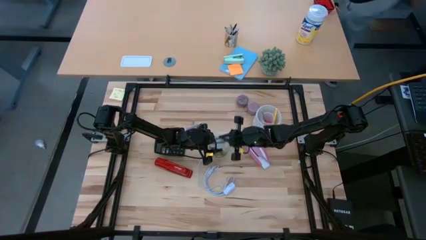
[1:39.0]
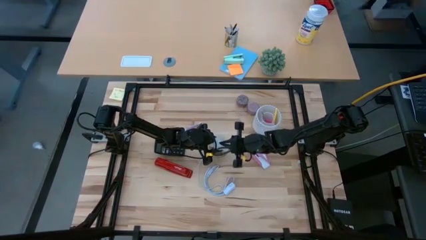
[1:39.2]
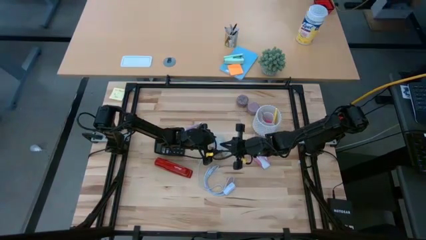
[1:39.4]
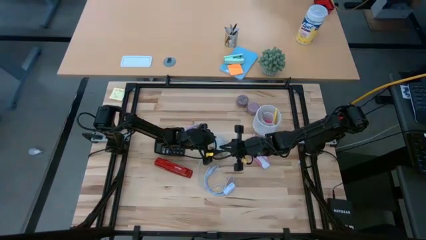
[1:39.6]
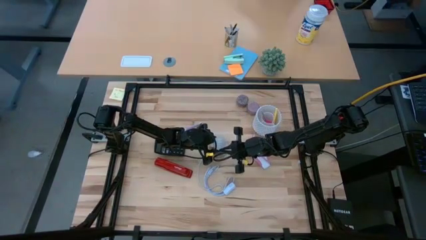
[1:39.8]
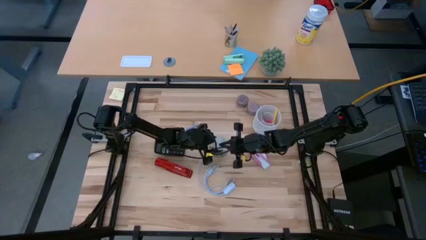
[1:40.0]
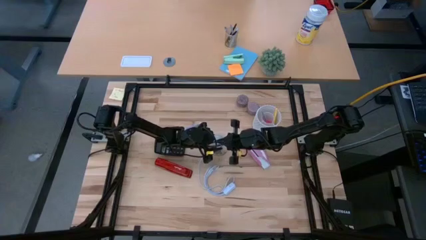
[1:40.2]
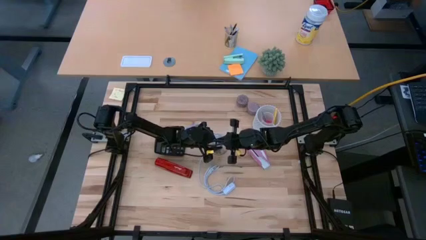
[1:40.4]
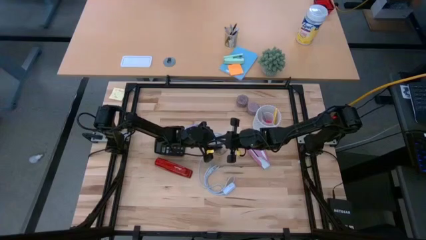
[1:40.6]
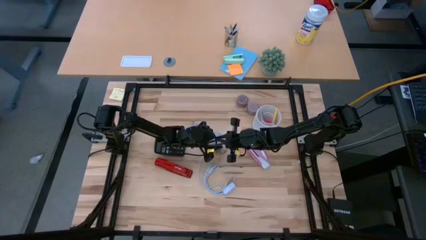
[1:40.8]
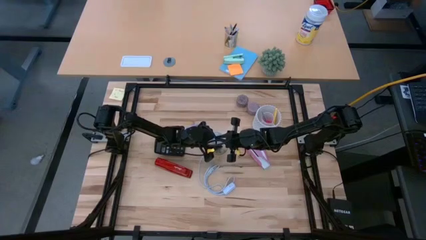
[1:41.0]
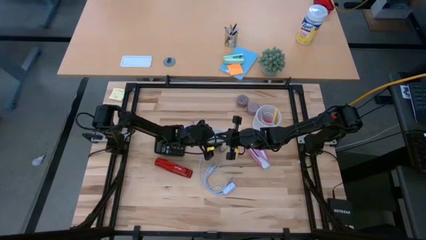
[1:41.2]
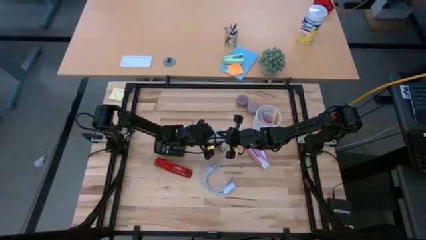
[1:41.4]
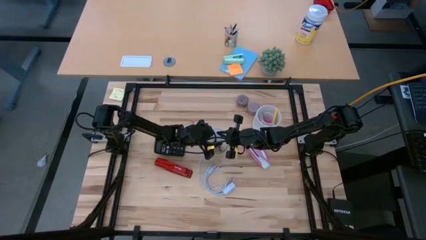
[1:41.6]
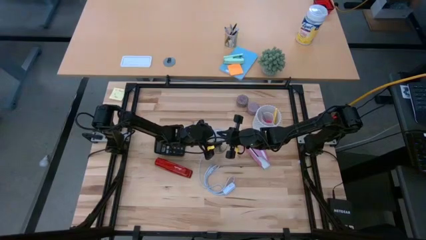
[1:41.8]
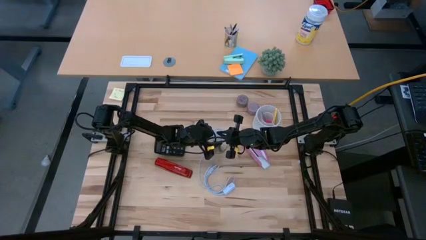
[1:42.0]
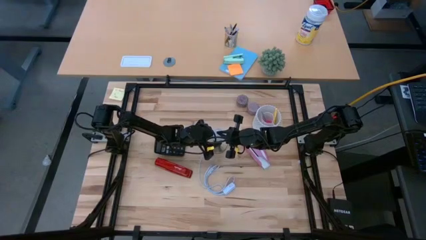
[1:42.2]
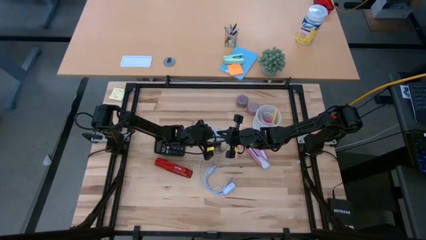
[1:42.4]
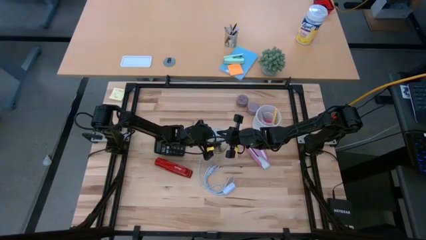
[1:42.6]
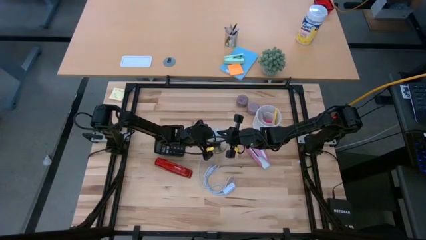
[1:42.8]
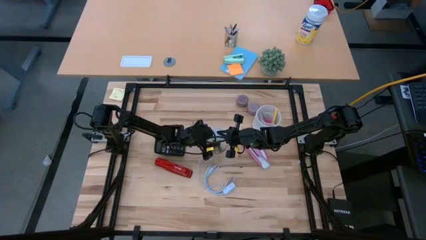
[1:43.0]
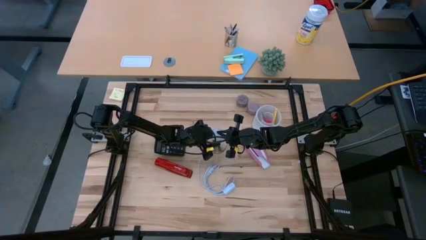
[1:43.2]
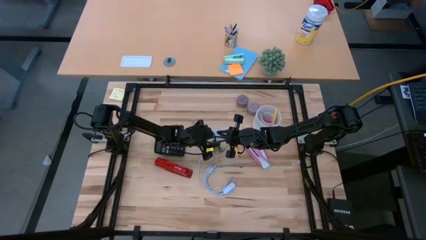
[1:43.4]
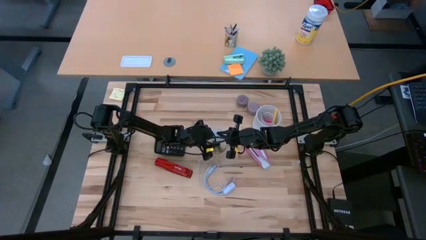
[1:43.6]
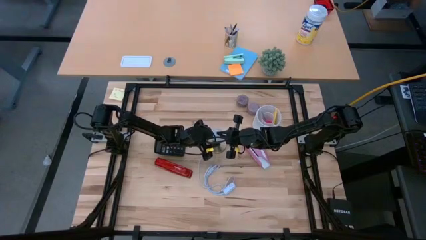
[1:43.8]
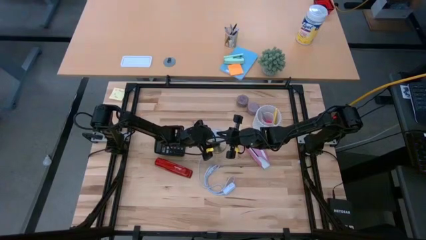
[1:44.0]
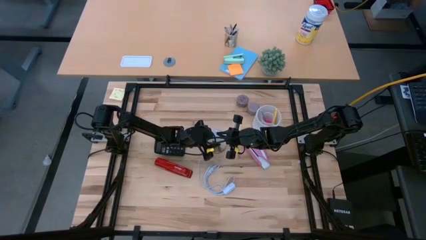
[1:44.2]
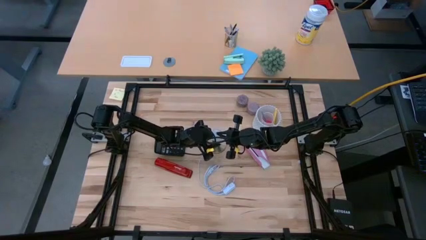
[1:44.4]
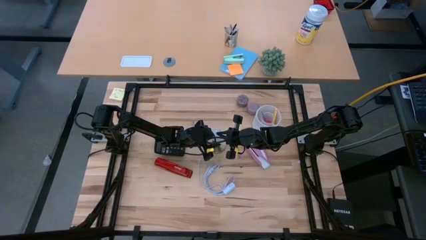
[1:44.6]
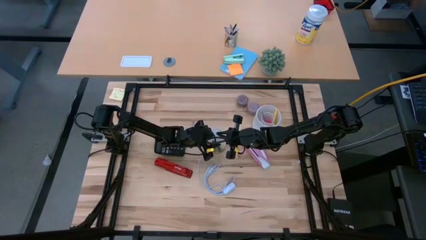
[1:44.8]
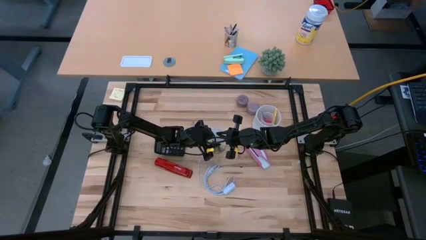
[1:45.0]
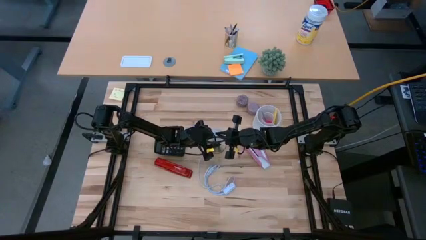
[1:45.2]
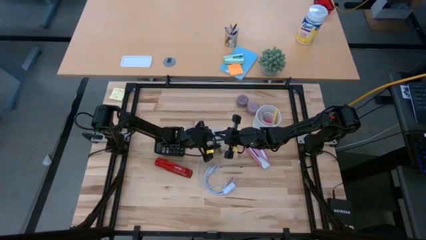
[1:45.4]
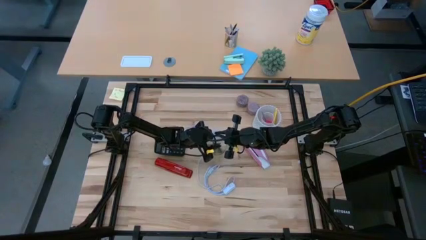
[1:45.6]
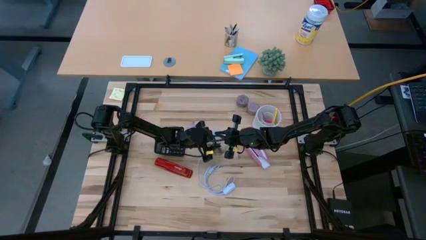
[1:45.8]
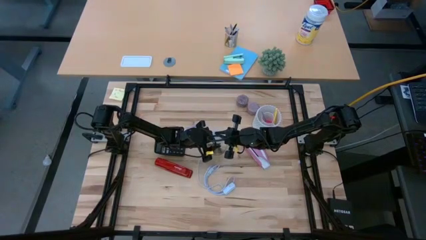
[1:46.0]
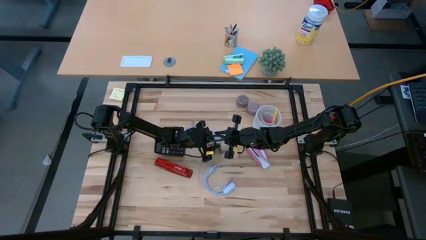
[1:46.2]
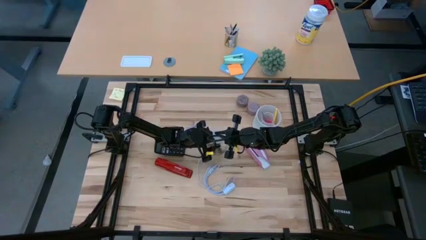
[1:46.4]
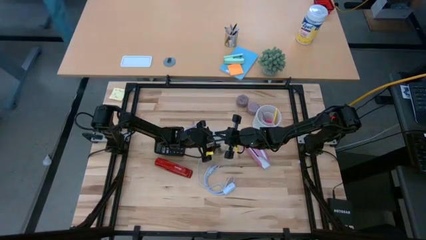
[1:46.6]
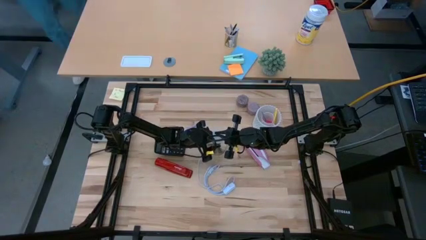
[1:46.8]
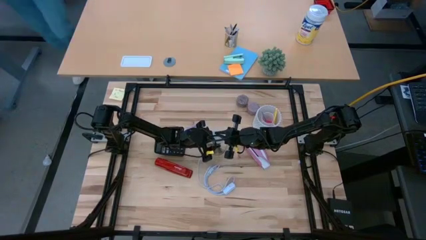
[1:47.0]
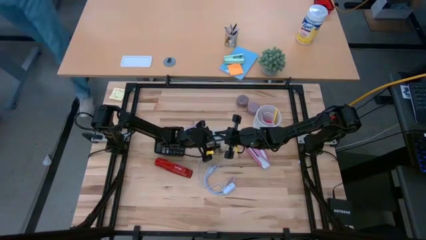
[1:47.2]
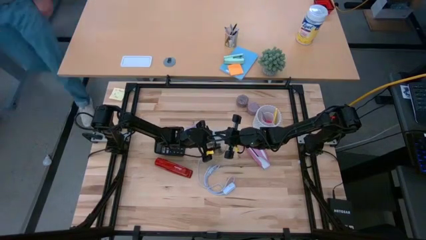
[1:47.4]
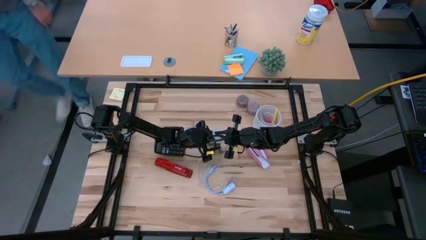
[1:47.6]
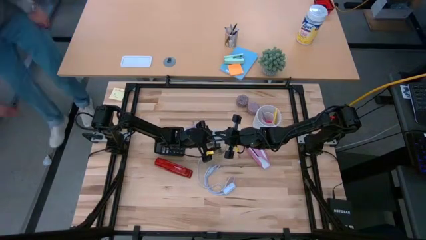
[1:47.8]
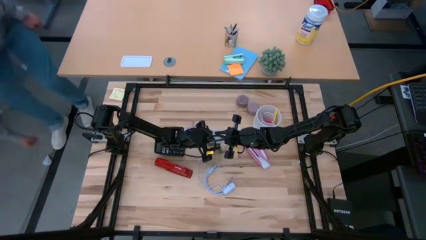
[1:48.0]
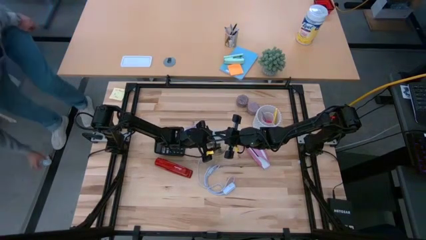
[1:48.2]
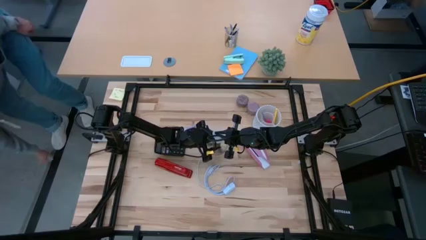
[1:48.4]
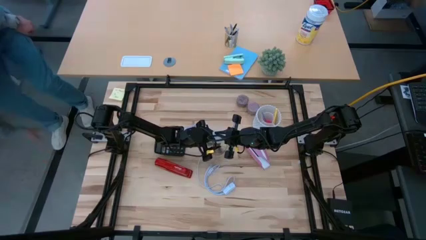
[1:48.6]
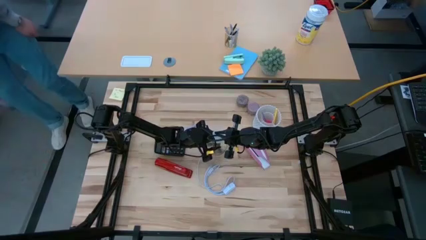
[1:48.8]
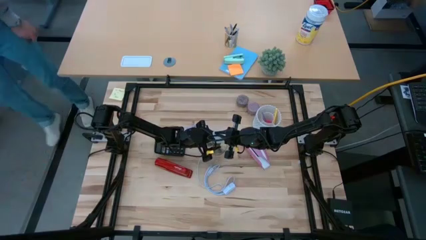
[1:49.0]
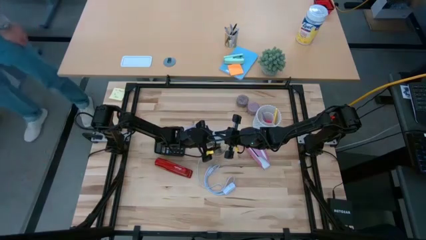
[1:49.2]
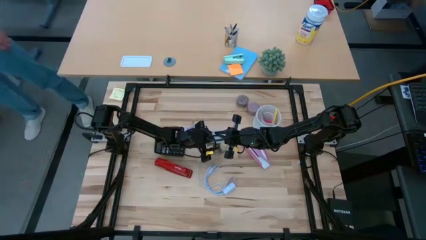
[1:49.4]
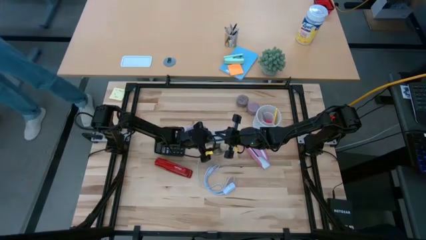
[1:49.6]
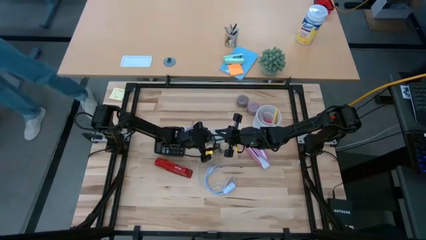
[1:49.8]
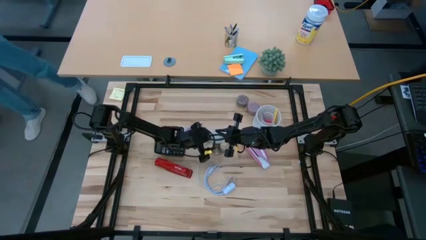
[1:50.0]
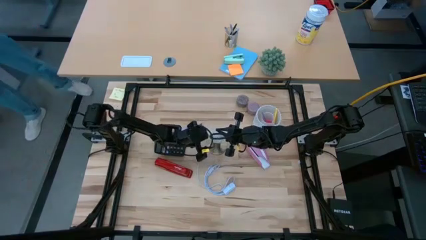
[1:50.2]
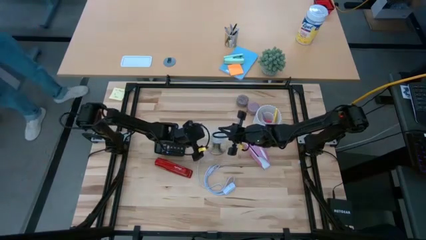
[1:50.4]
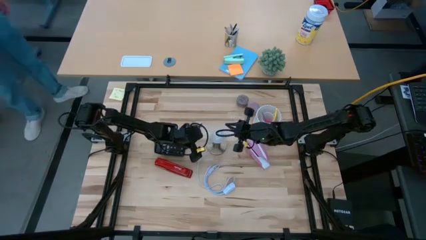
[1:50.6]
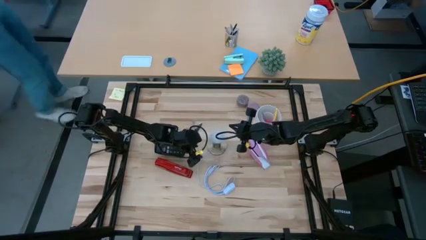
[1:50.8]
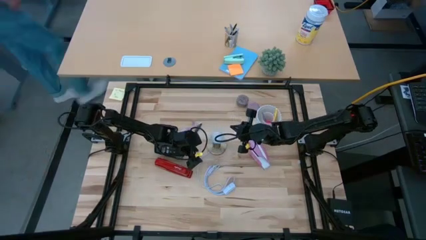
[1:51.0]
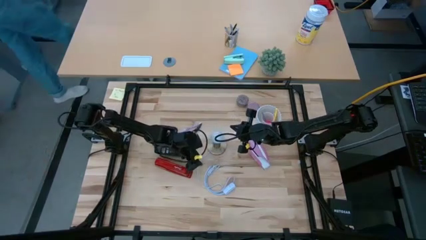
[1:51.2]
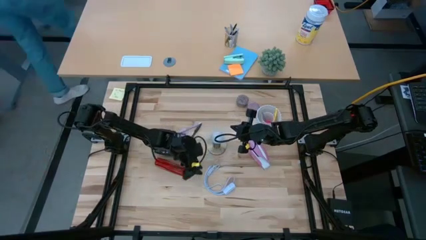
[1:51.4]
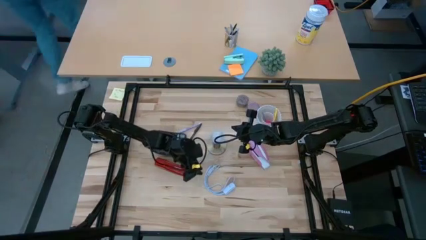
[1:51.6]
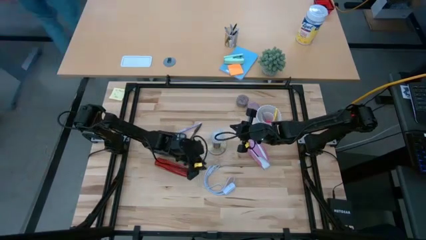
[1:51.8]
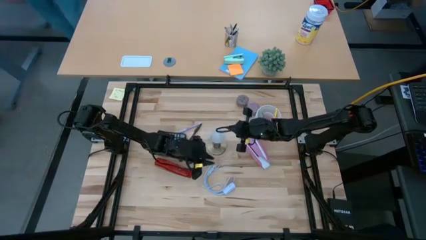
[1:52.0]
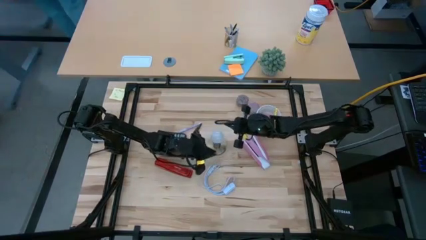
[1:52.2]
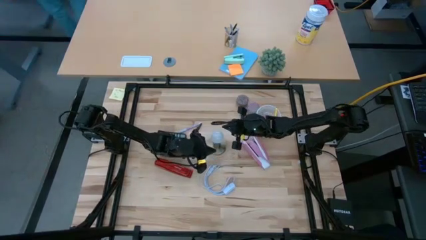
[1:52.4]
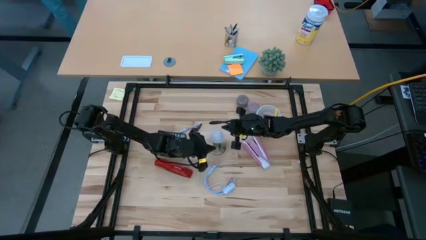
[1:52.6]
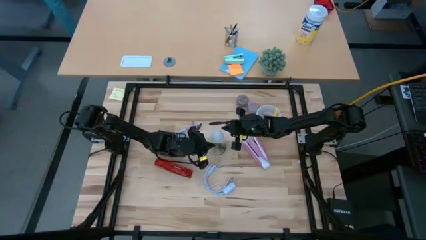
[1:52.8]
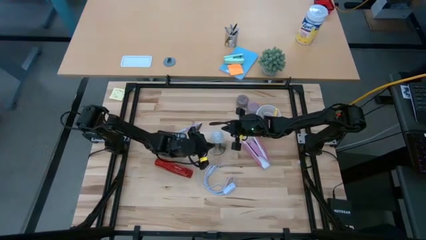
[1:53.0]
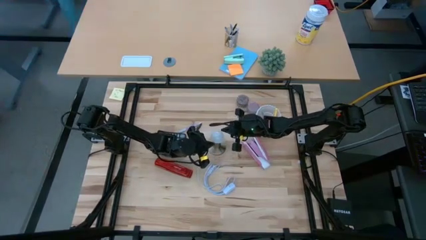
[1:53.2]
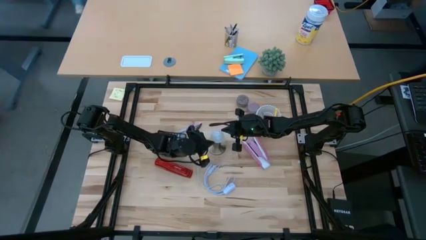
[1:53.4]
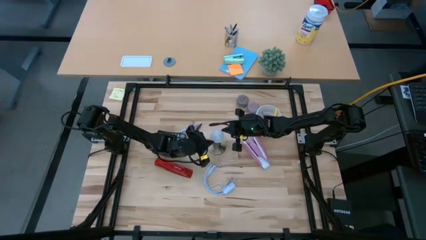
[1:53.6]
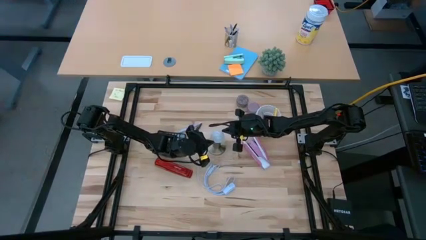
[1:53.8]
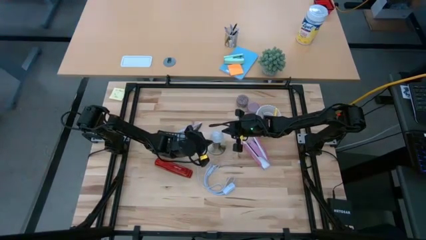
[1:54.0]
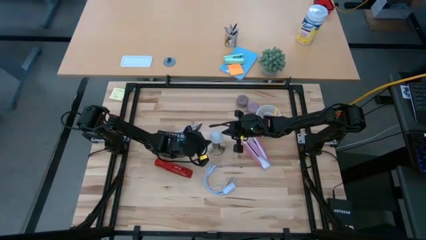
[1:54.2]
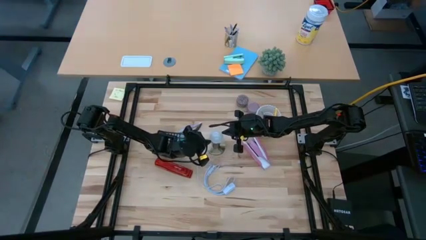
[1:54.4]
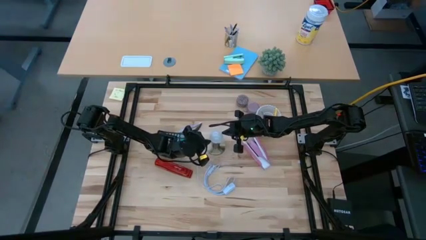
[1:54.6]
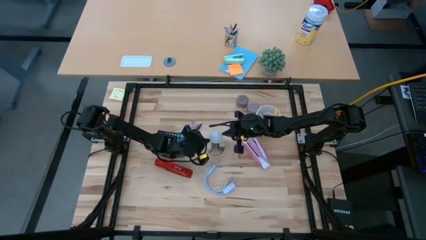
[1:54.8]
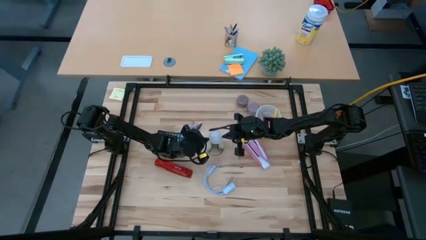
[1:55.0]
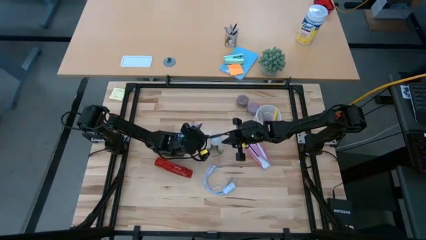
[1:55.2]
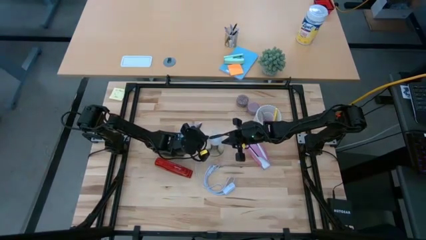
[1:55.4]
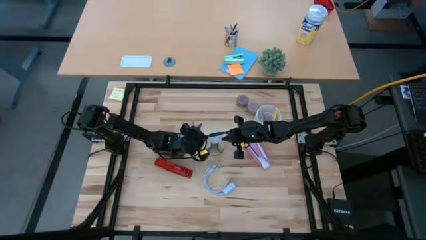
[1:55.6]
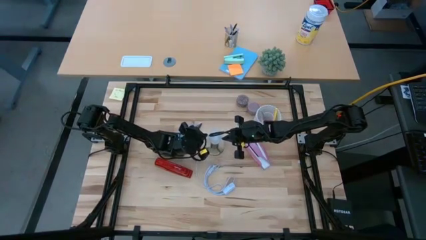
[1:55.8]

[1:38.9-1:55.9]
Task: Screw lightbulb
Insert the white lightbulb into the golden lamp
